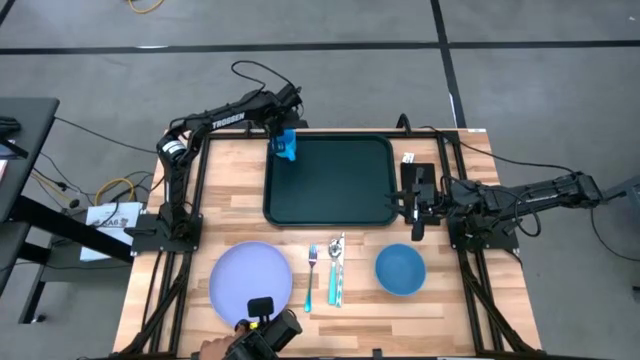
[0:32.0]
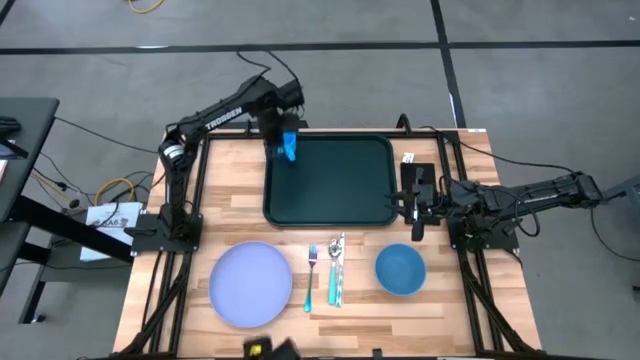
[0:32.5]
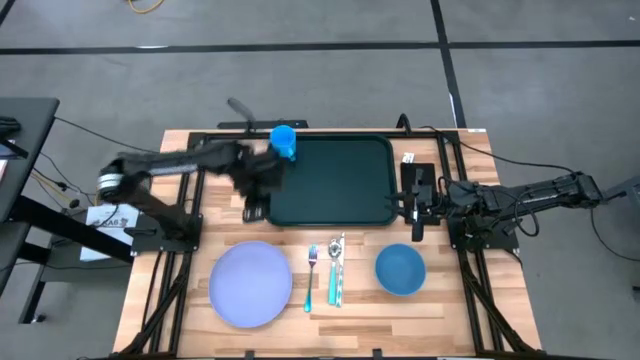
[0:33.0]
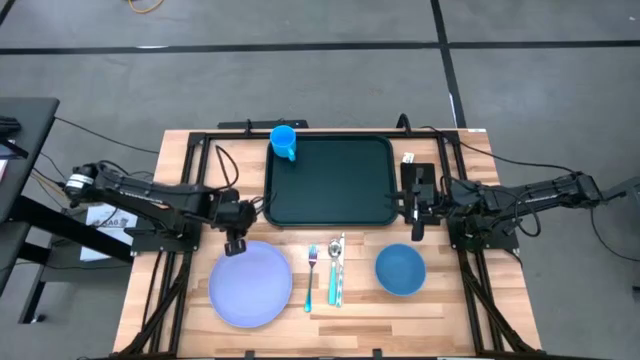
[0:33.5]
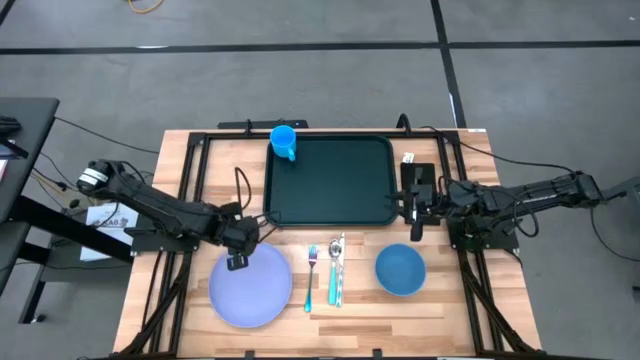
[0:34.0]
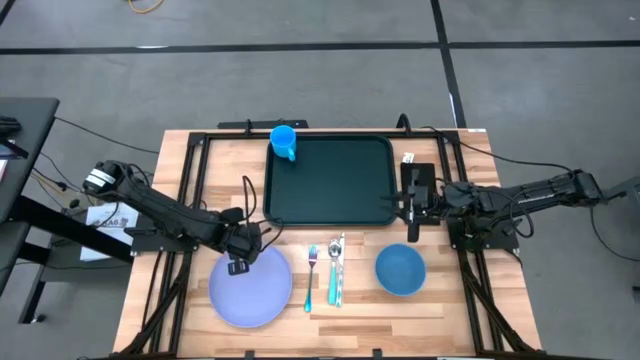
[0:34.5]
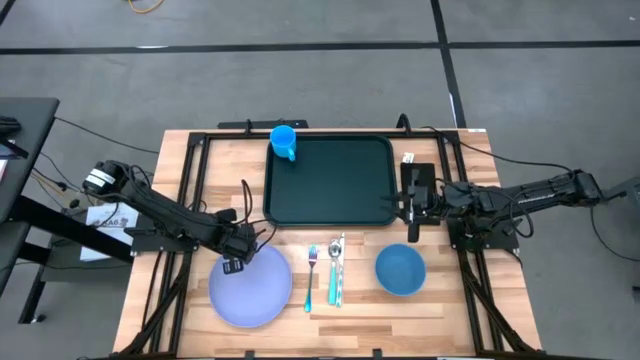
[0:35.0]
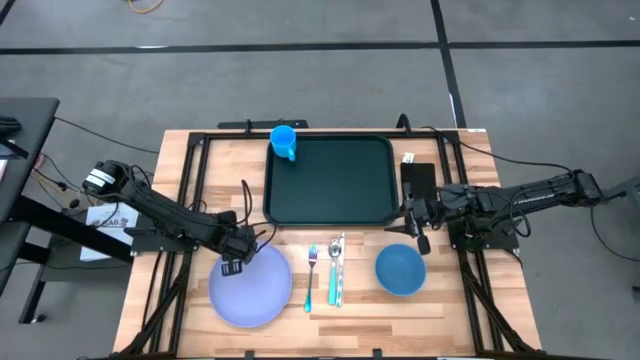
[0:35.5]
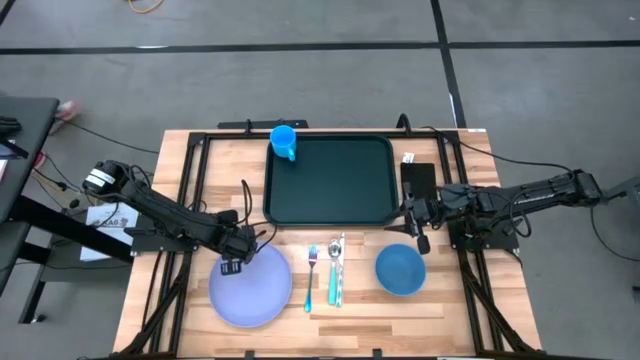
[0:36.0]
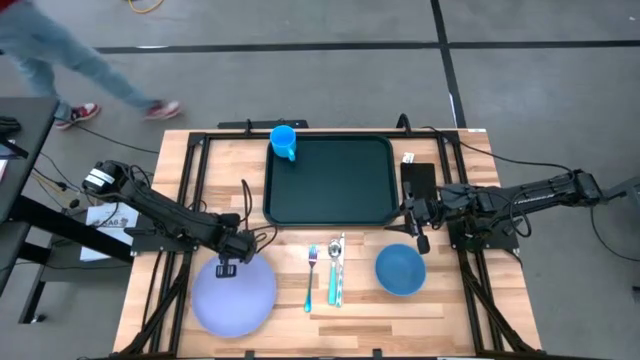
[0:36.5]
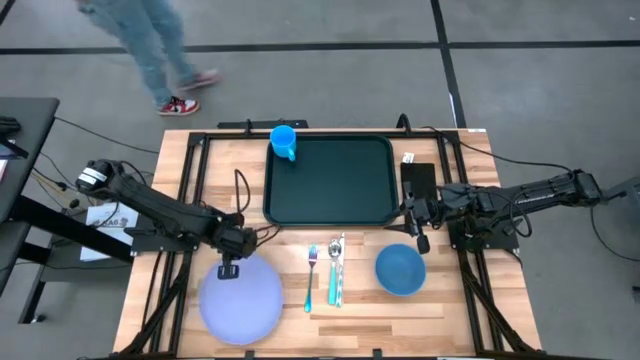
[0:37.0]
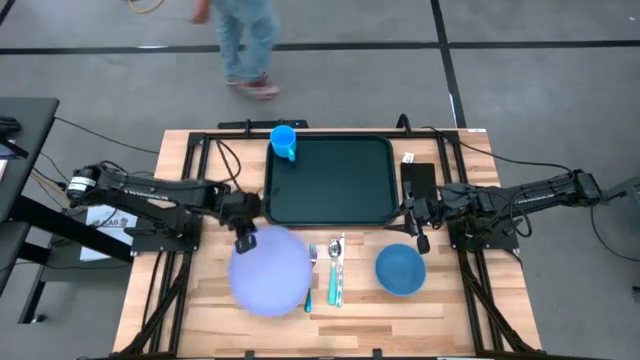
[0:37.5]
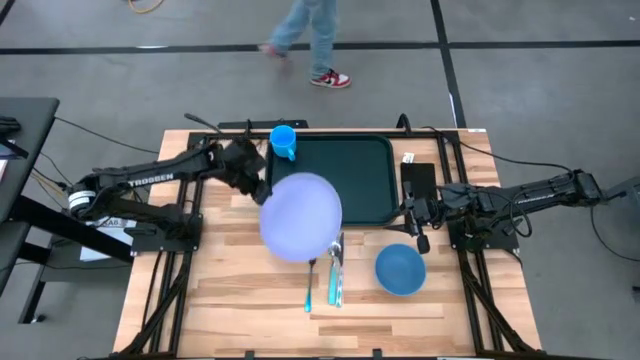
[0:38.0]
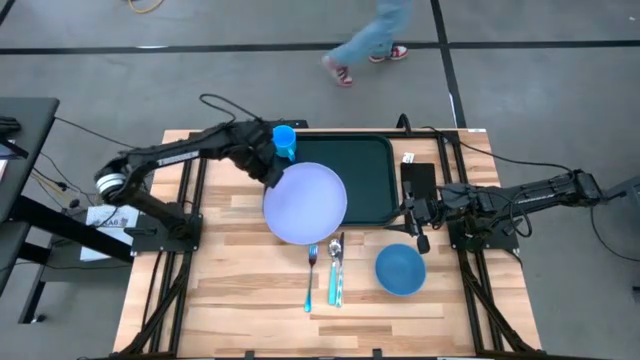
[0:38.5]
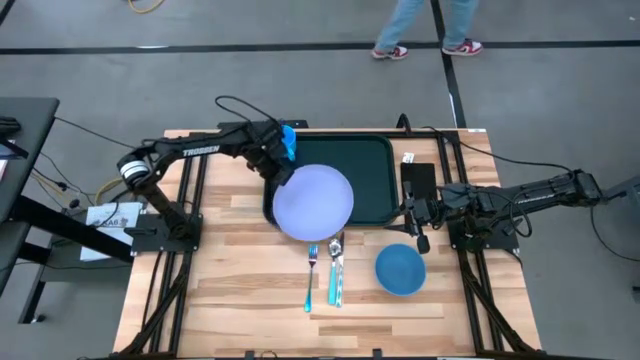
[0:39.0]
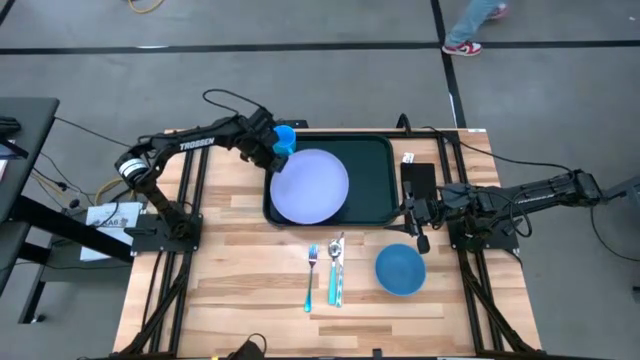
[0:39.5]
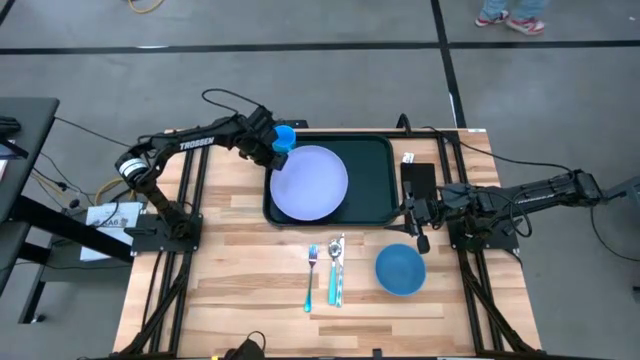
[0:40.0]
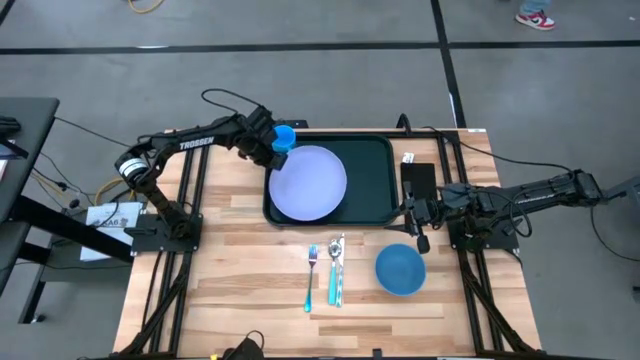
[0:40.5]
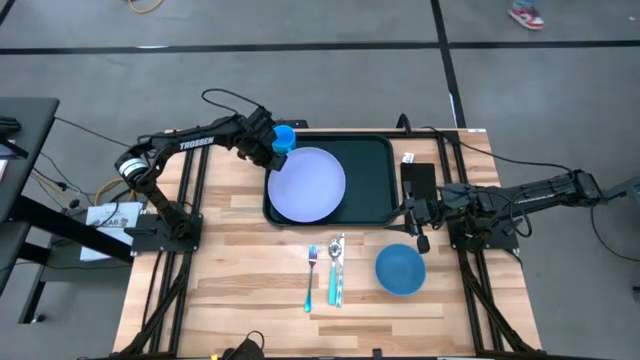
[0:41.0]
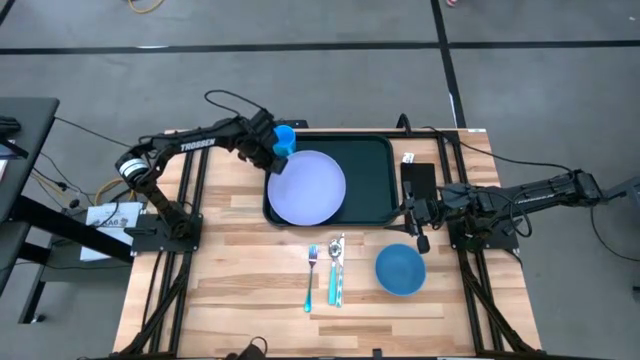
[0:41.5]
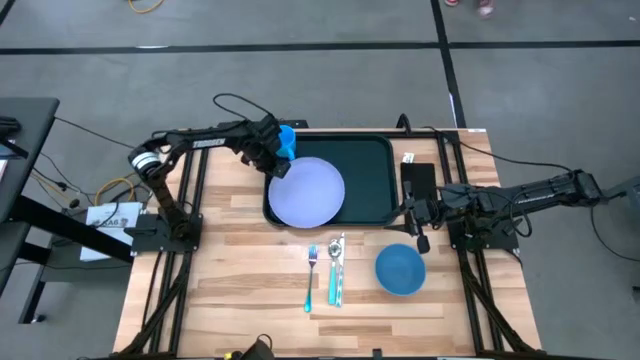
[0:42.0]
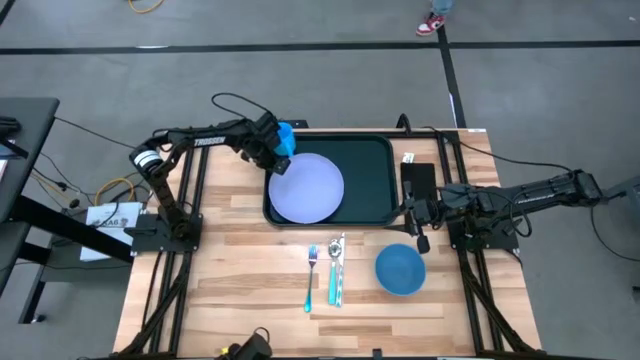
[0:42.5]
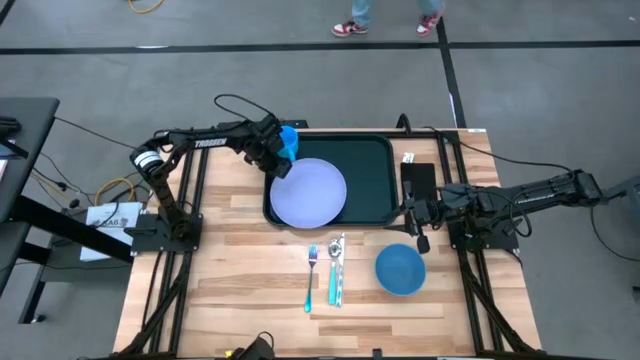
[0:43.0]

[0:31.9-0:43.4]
Task: Set up tray
Put the violet plate on the black serving tray to the bottom right of the blue mug

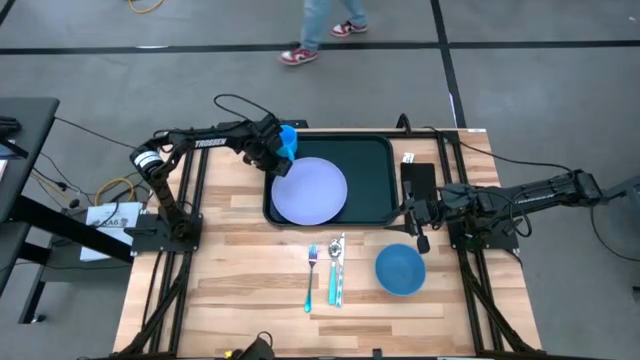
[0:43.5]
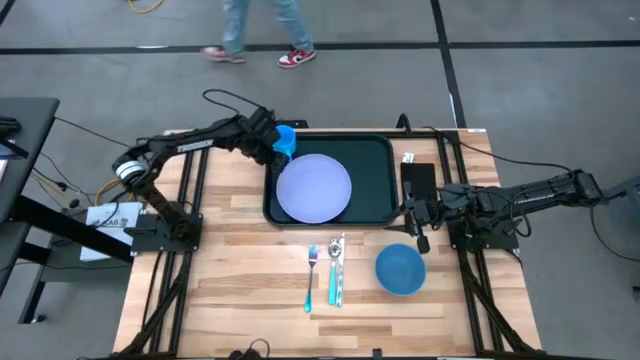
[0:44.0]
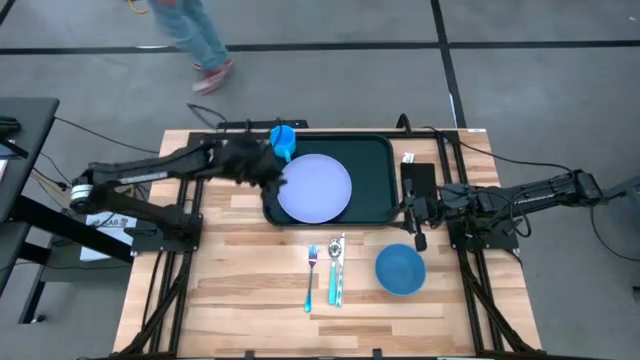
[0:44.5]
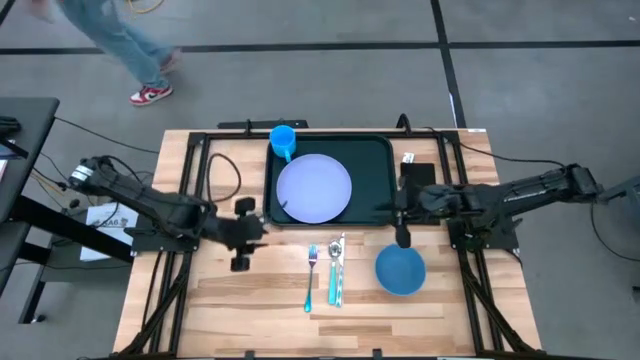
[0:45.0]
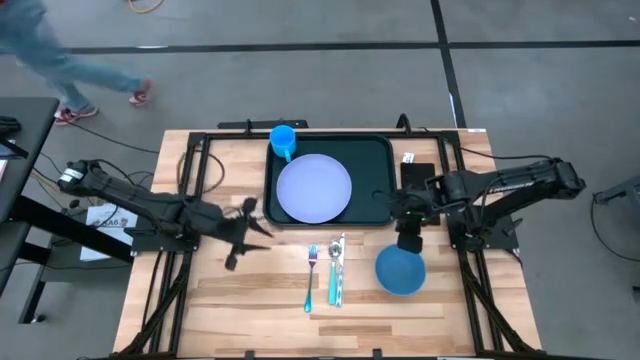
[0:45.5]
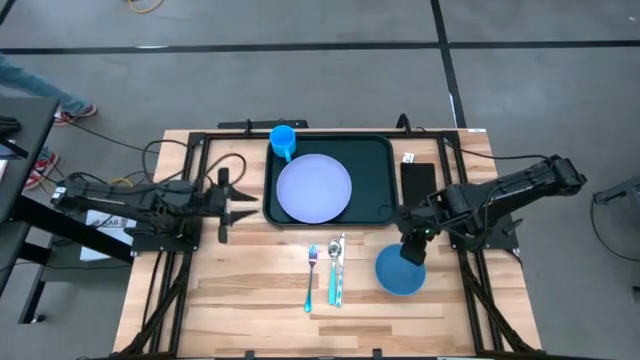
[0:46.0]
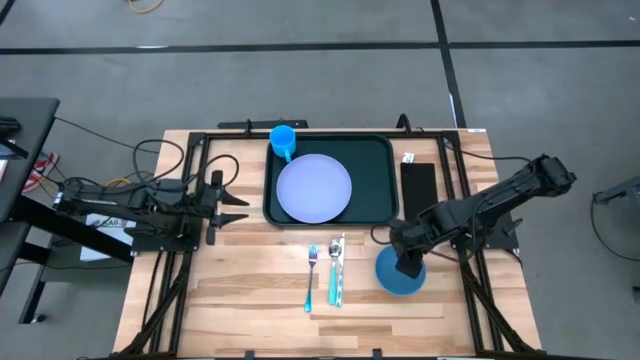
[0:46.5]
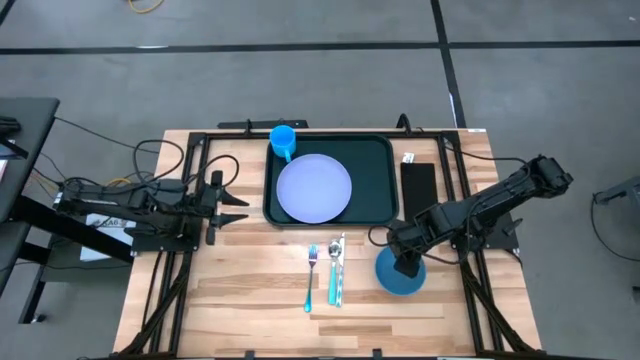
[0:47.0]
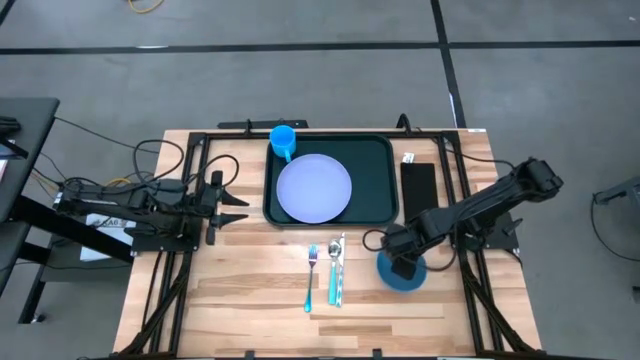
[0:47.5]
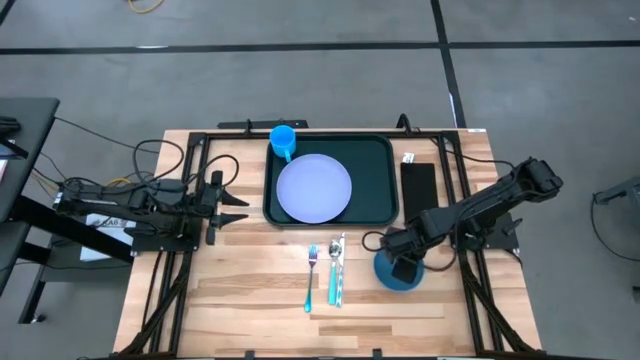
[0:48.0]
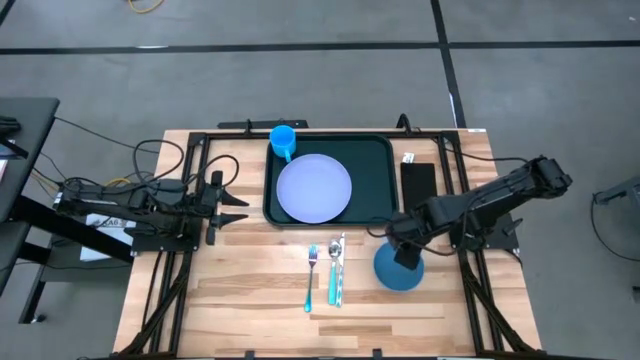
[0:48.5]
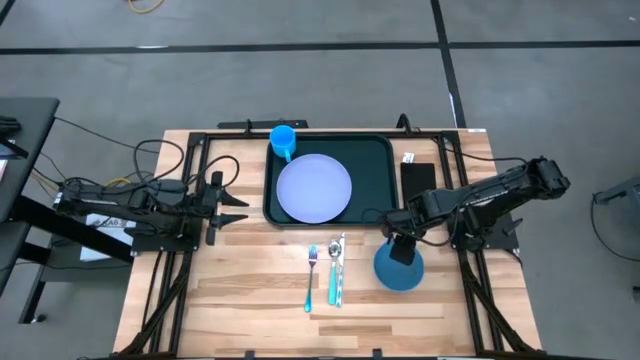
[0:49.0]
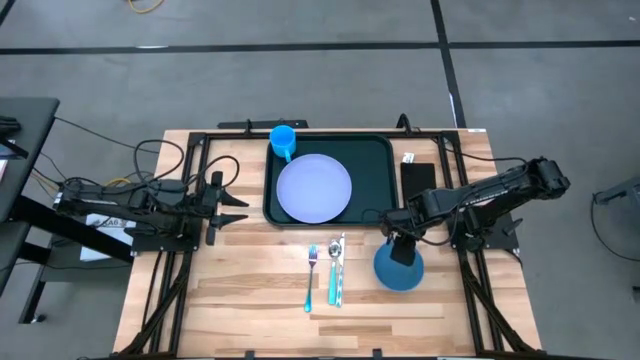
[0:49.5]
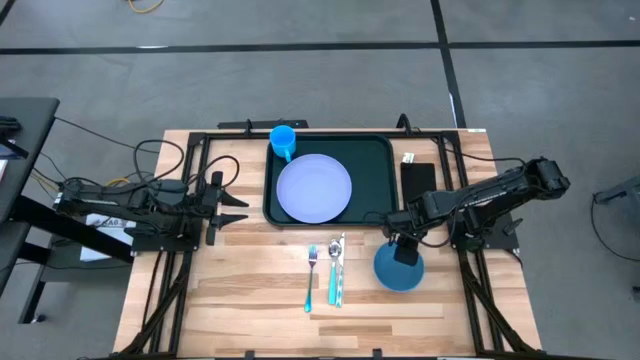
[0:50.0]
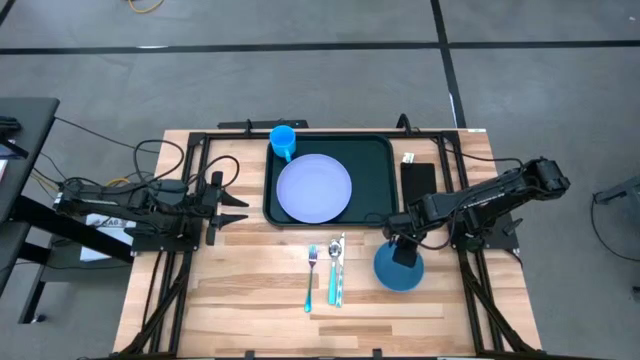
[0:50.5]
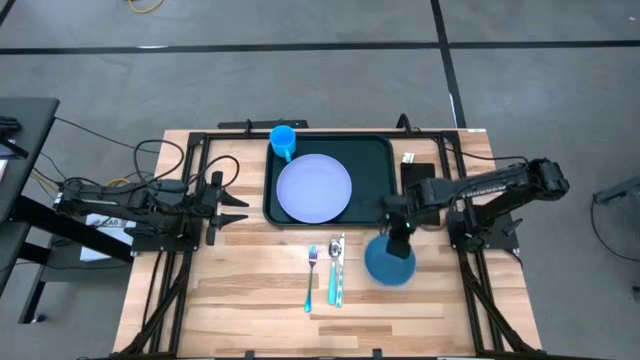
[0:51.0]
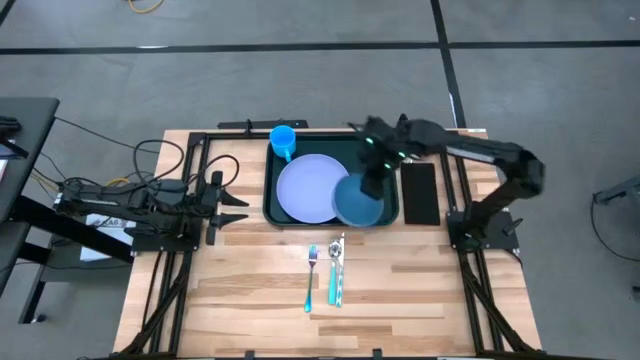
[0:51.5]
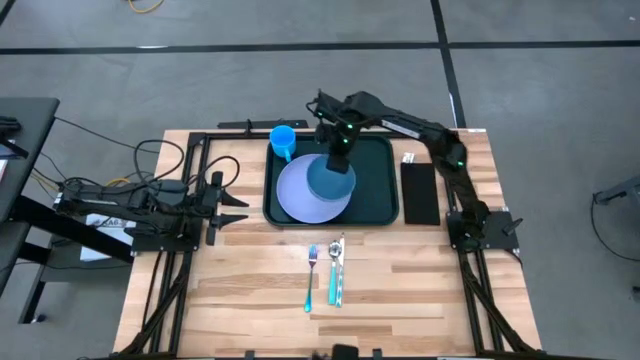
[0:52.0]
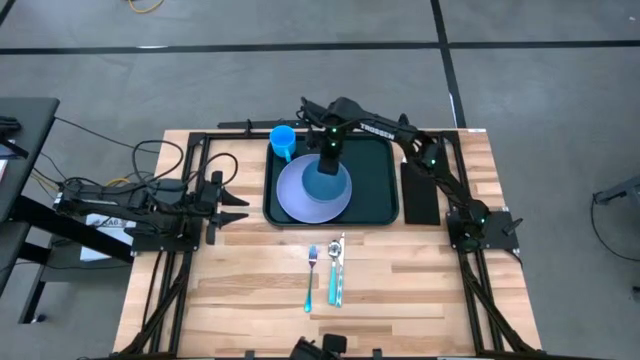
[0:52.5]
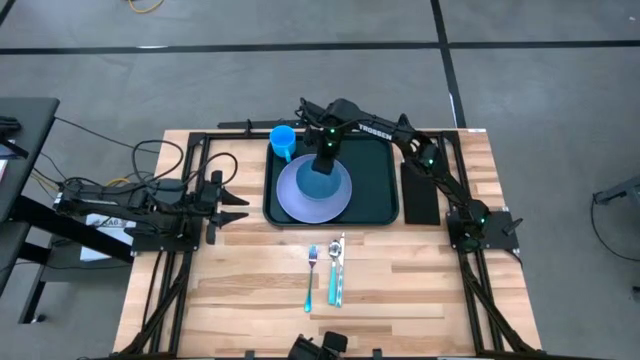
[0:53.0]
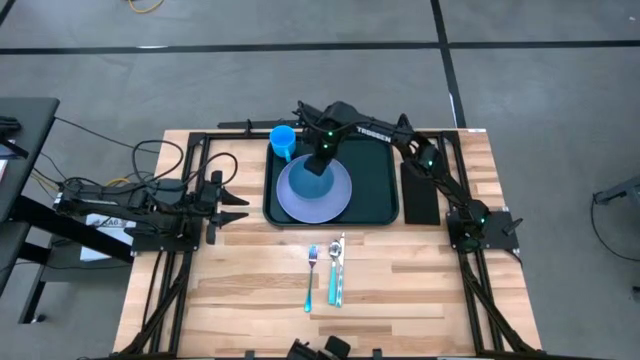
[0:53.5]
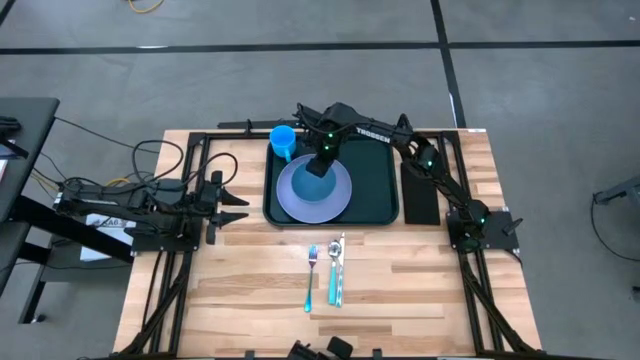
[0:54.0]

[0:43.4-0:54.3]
Put the blue bowl on the violet plate
